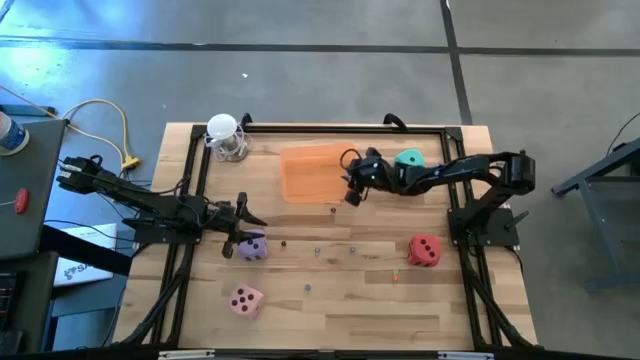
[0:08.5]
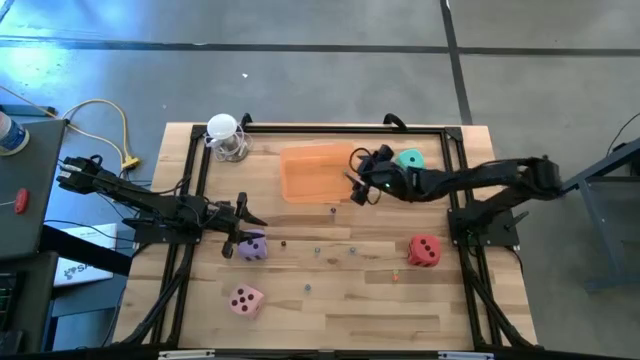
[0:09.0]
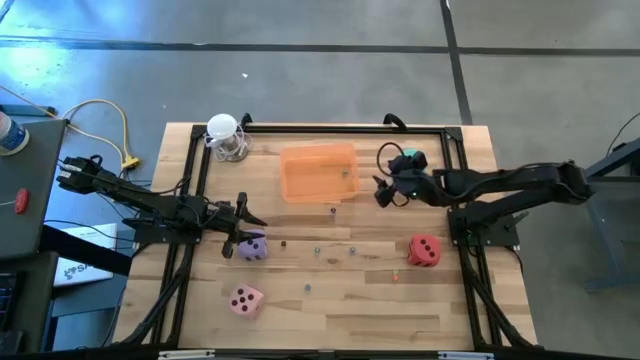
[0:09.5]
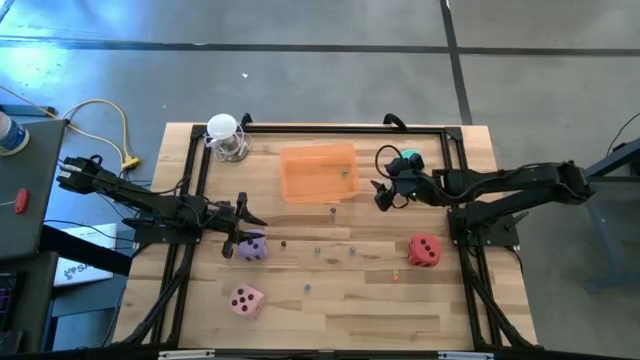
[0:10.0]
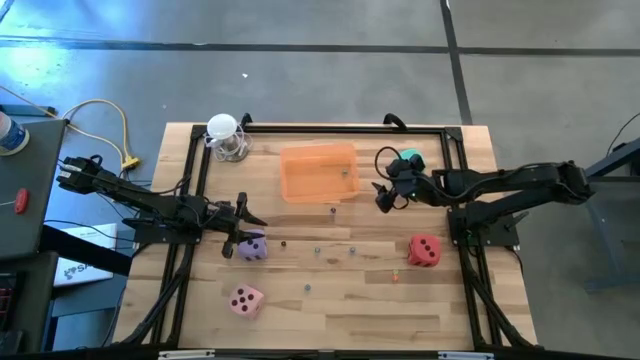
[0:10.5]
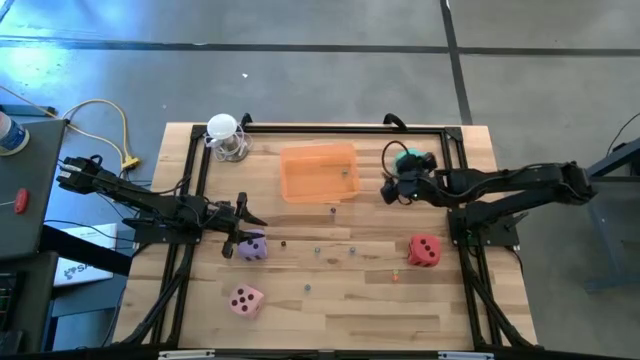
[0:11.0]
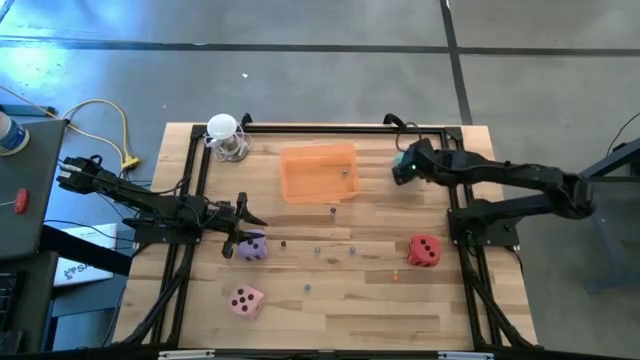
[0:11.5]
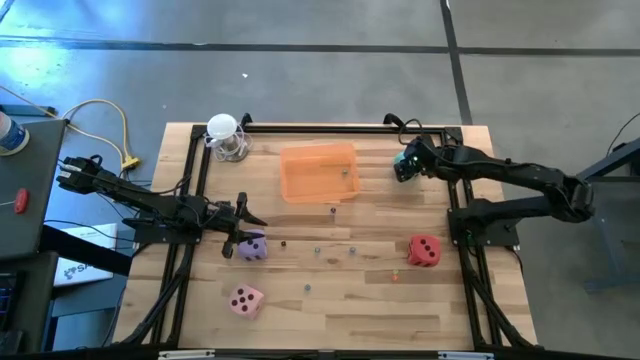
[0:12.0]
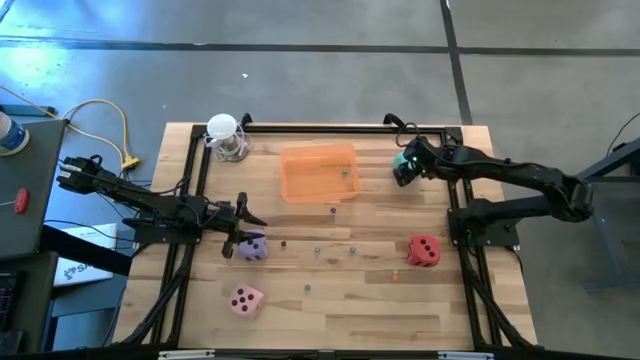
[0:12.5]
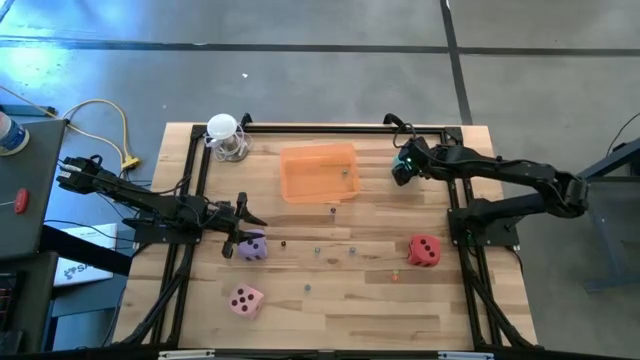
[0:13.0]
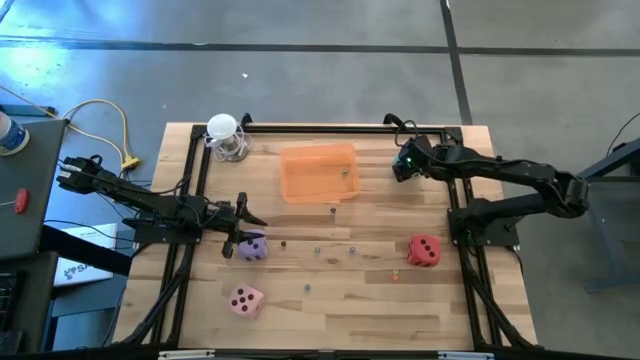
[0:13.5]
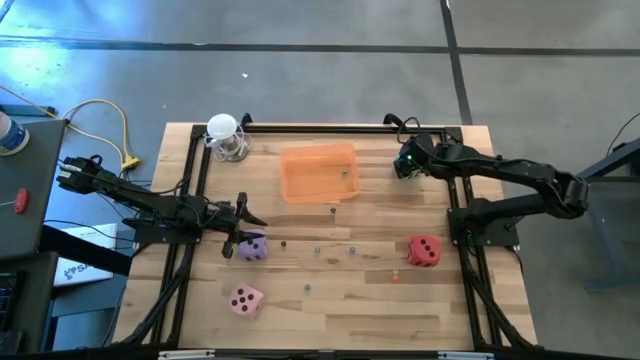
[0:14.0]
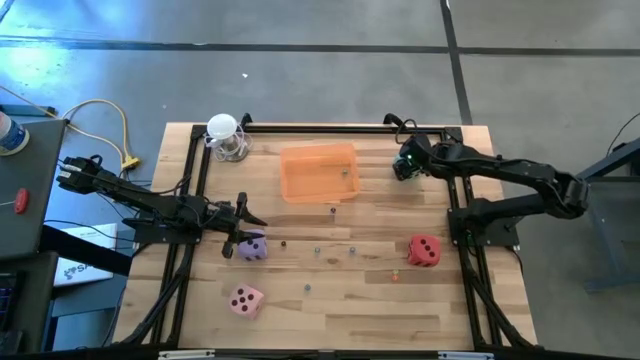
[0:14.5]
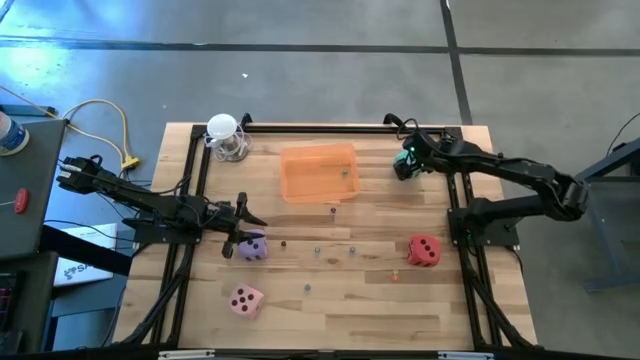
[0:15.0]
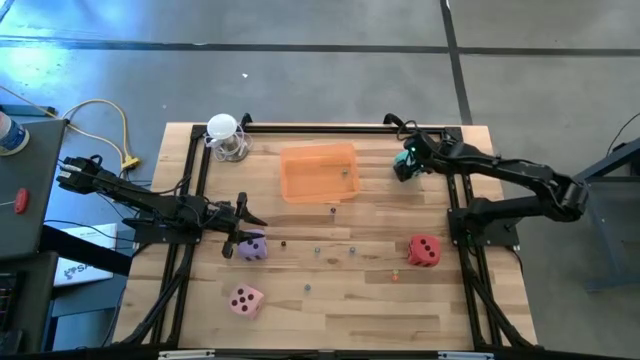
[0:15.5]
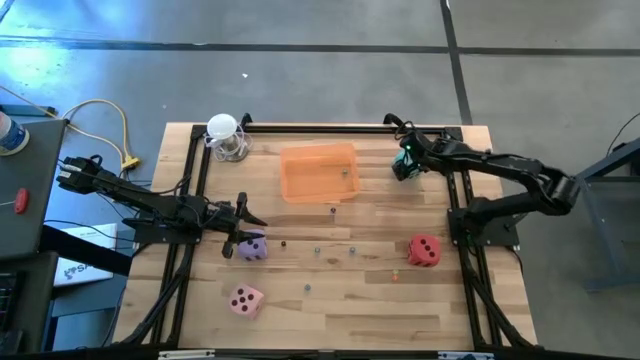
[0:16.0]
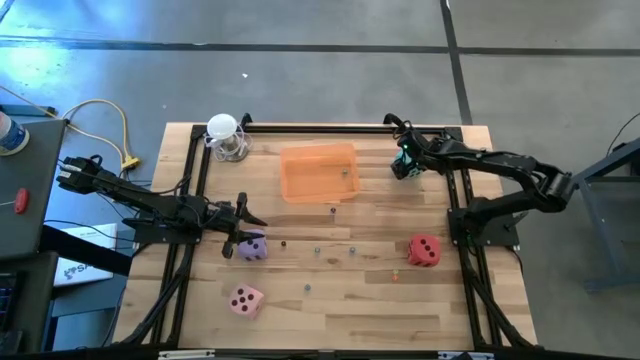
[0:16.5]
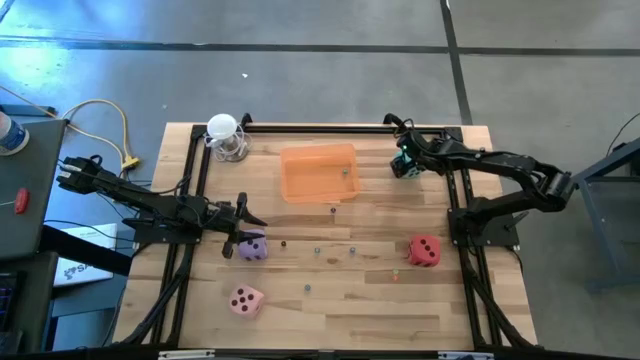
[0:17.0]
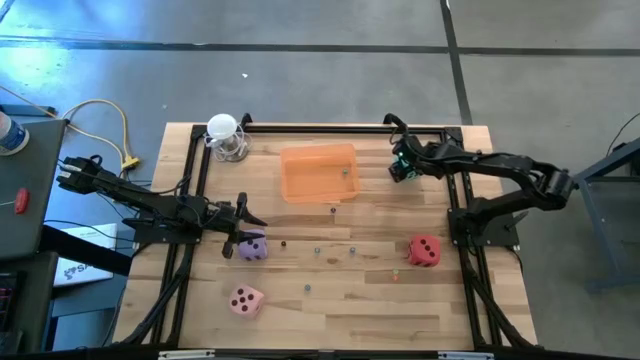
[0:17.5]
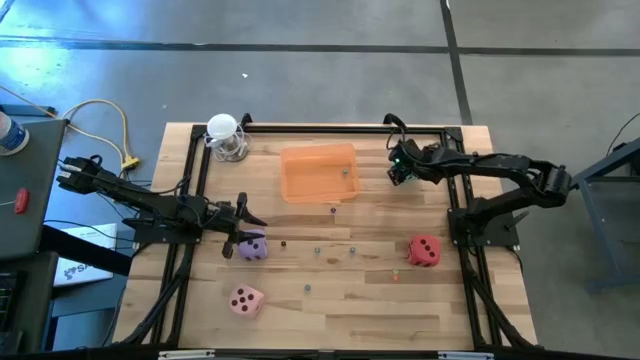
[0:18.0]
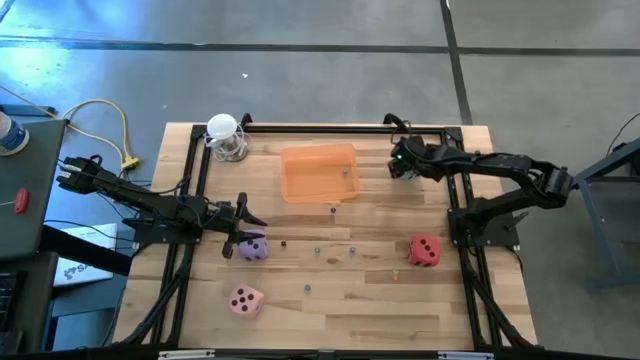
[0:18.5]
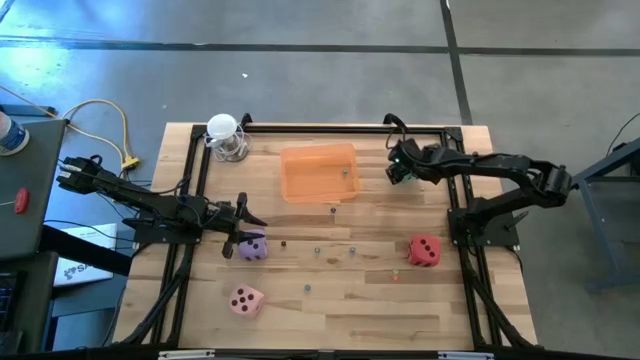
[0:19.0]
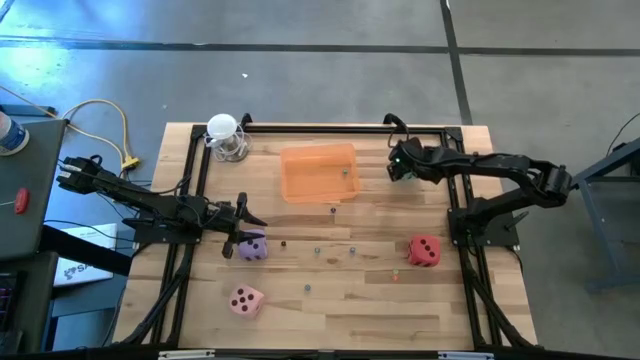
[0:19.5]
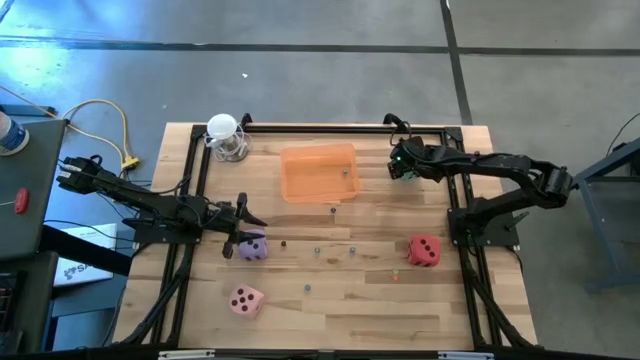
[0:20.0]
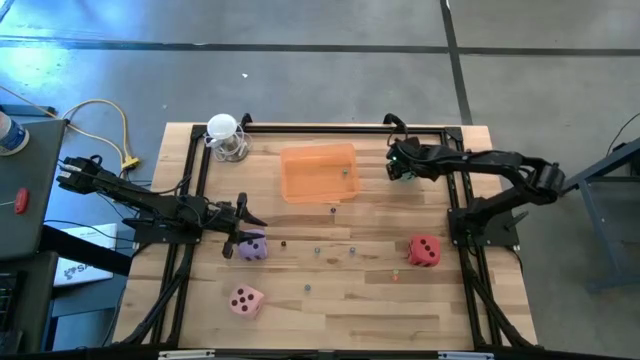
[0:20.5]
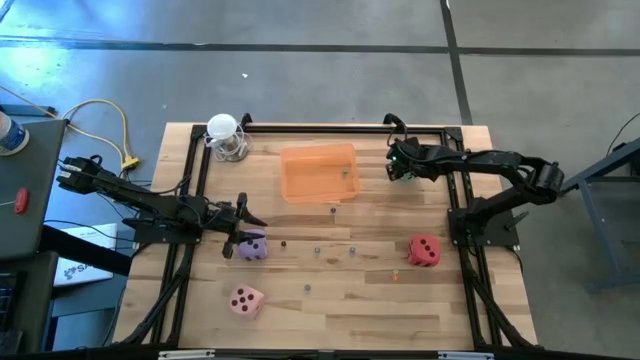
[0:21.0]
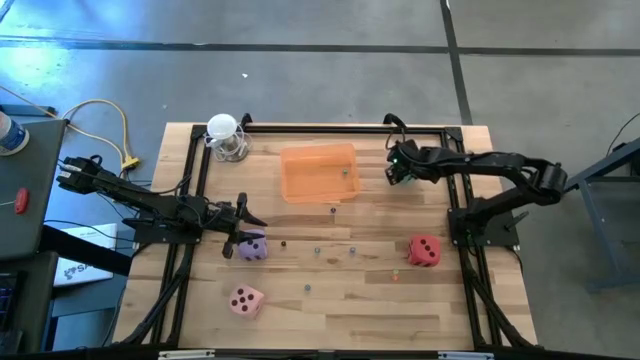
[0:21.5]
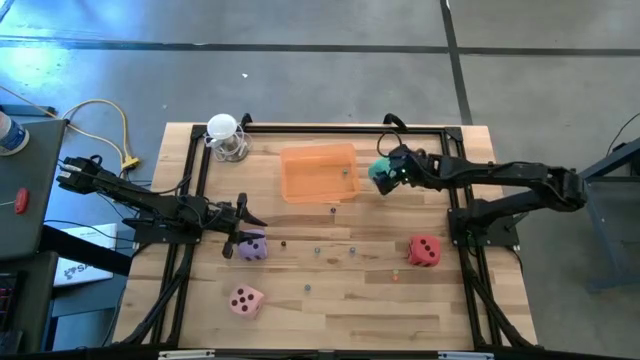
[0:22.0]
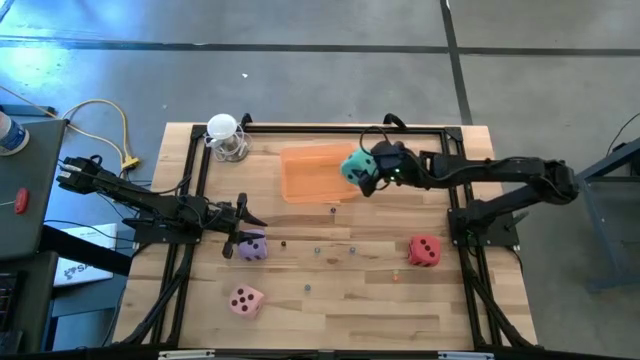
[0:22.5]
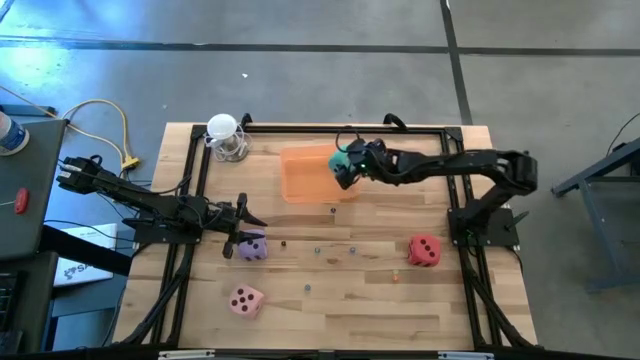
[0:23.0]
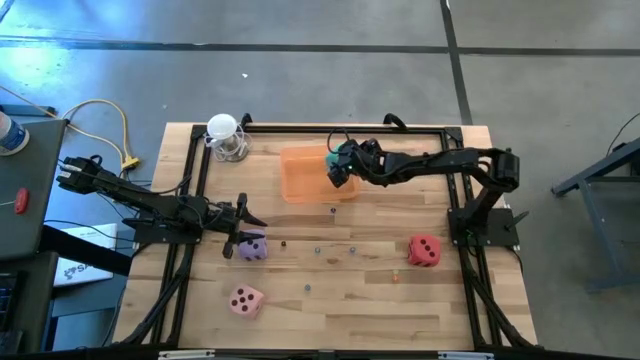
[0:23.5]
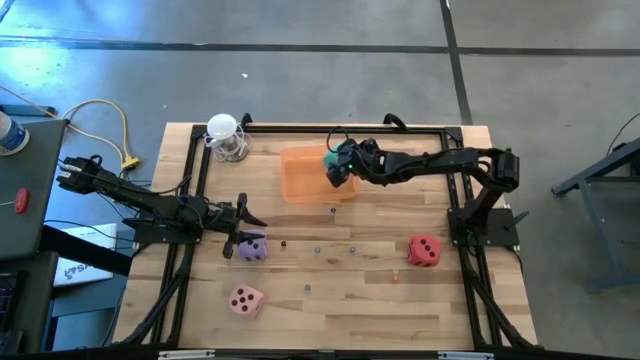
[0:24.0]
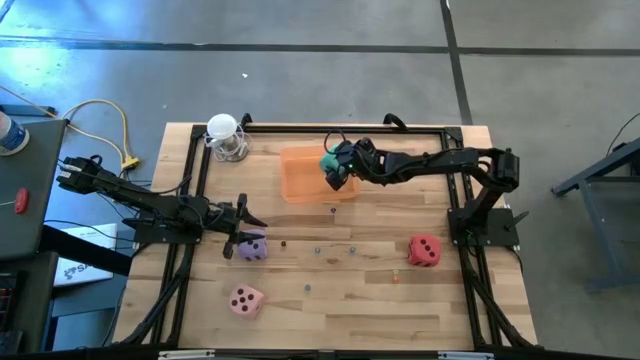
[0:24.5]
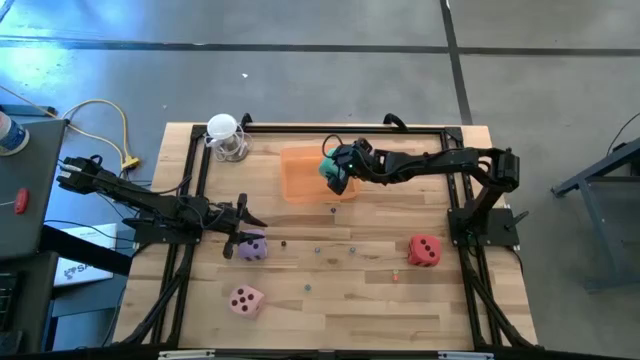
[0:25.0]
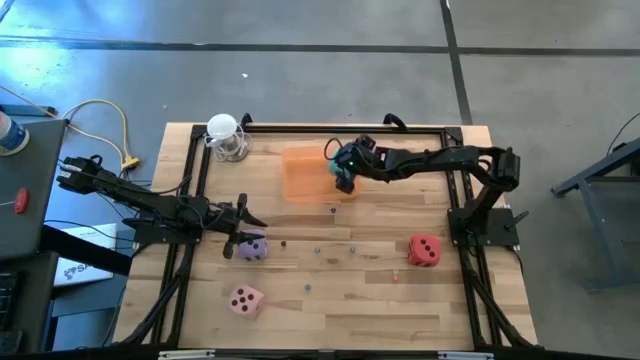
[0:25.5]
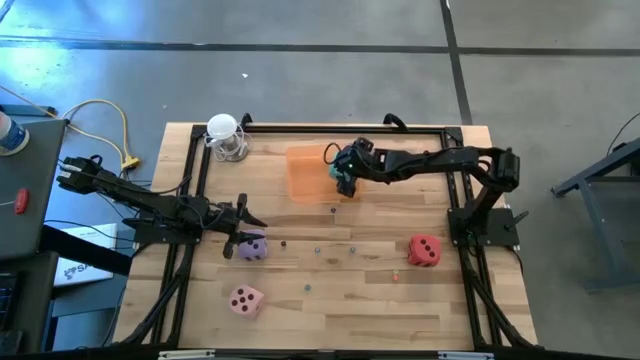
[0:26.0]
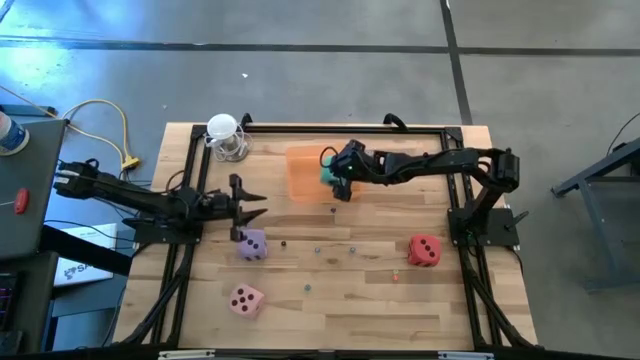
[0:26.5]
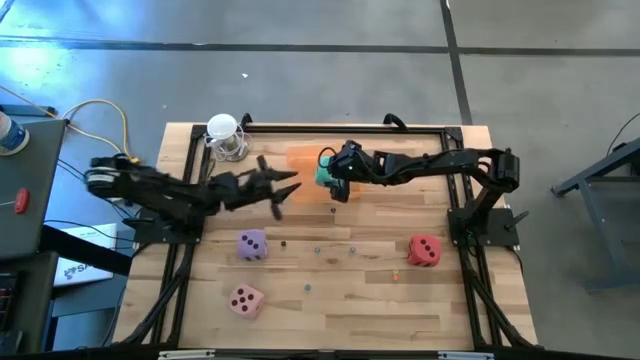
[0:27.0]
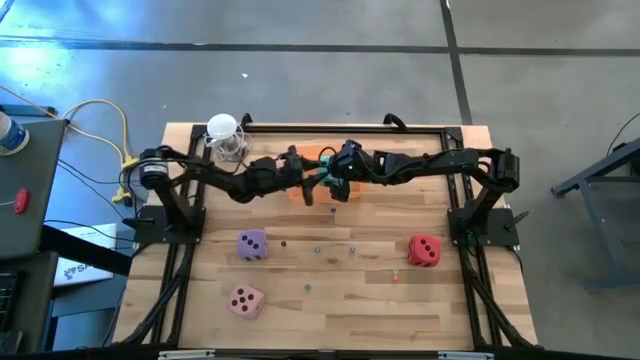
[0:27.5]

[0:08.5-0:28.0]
Task: Pick & Place Dice
Put the large blue dice into the orange container

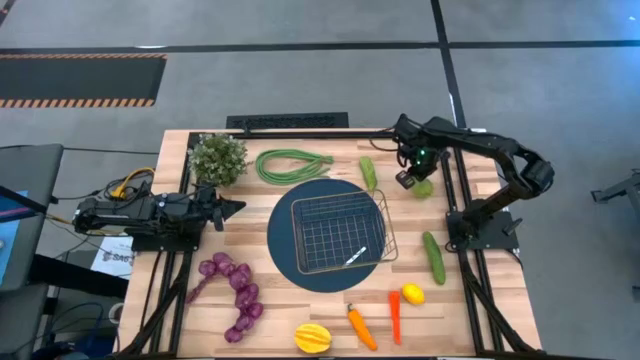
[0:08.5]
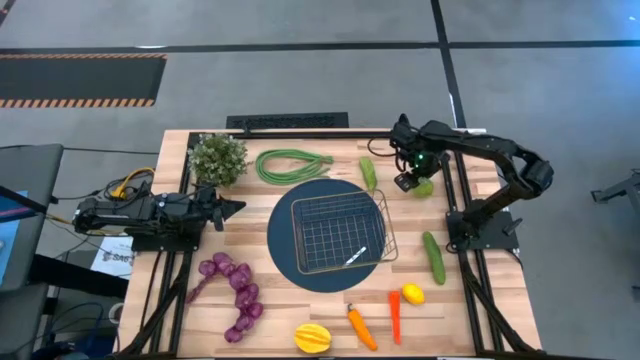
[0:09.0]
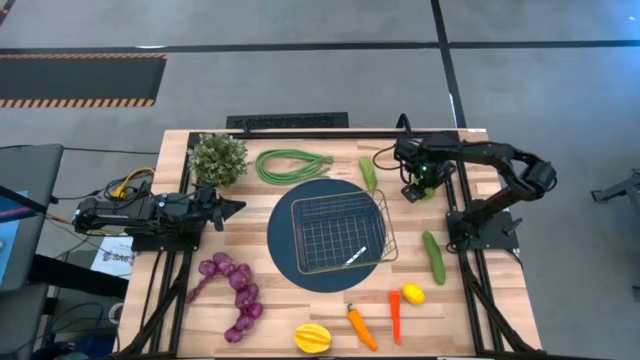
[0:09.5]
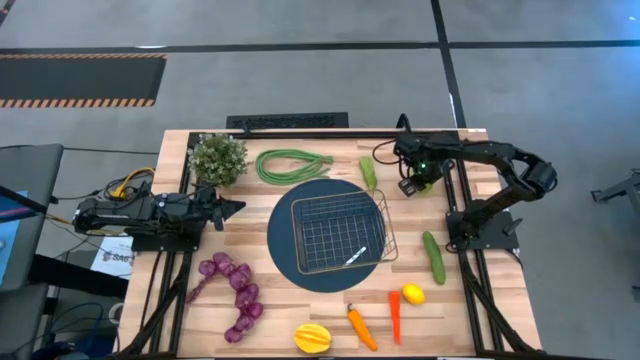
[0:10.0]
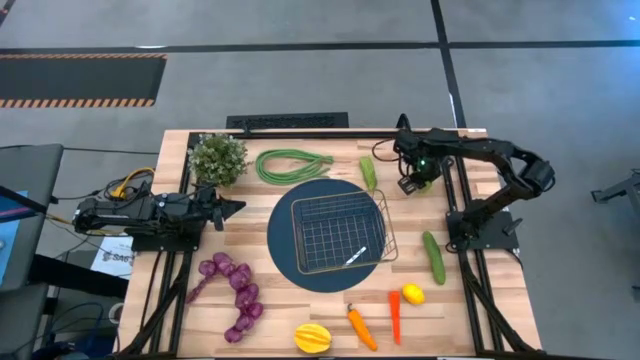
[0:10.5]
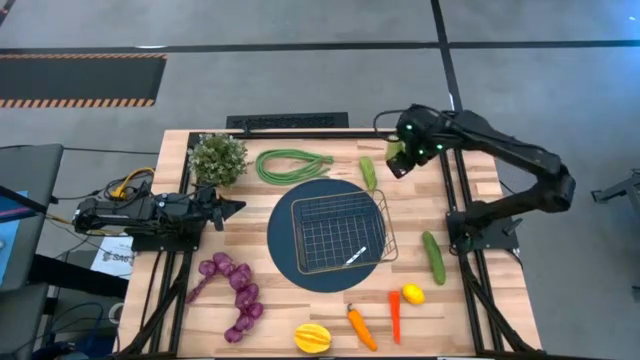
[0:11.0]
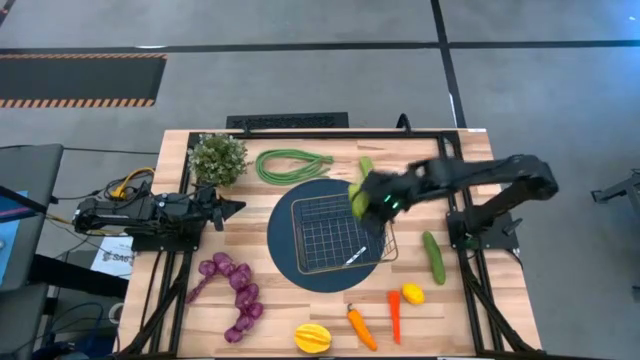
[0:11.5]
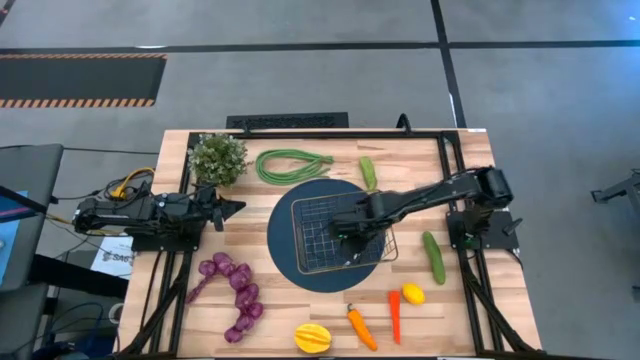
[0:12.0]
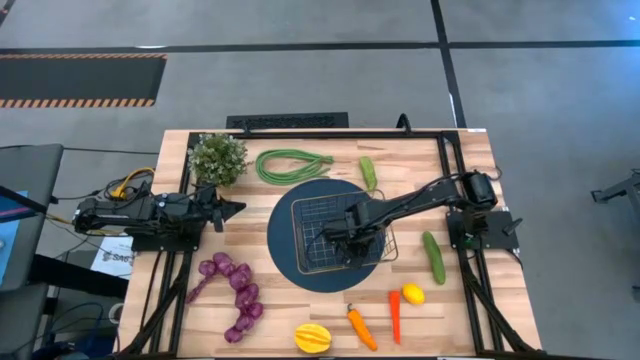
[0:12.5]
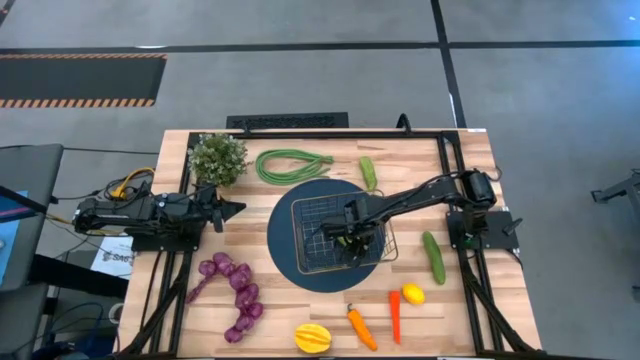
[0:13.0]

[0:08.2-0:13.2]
Task: Build produce basket
Put the green chayote into the gold wire basket
